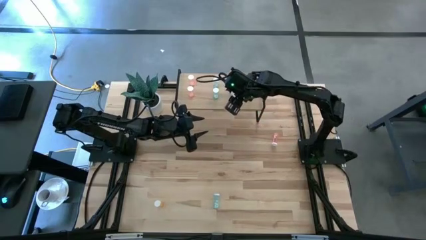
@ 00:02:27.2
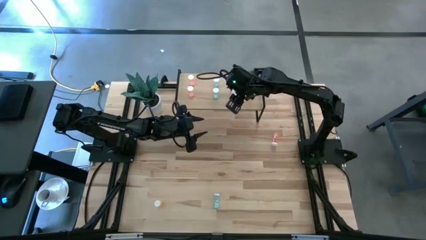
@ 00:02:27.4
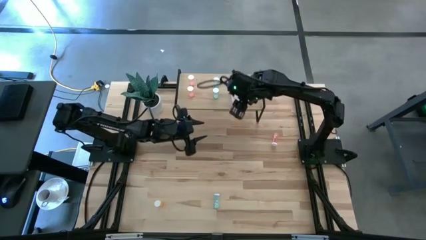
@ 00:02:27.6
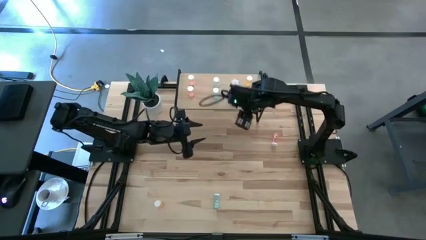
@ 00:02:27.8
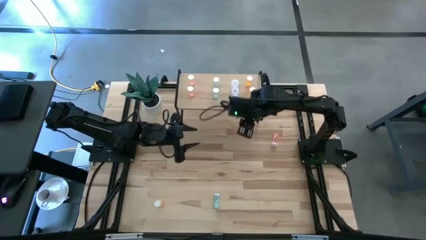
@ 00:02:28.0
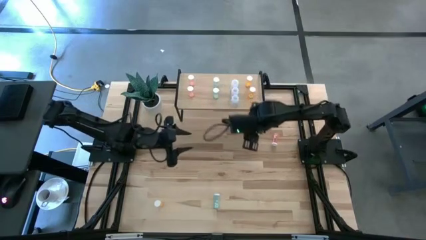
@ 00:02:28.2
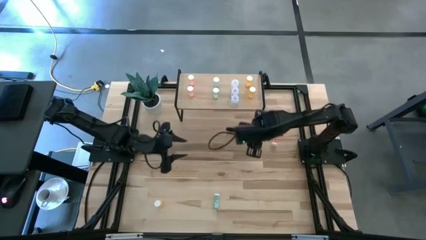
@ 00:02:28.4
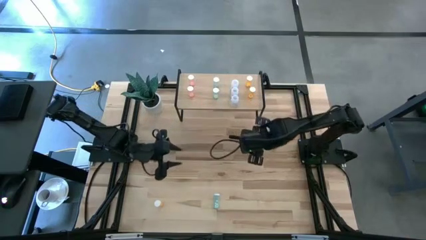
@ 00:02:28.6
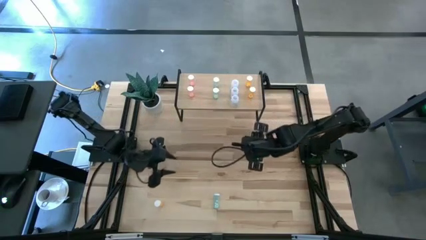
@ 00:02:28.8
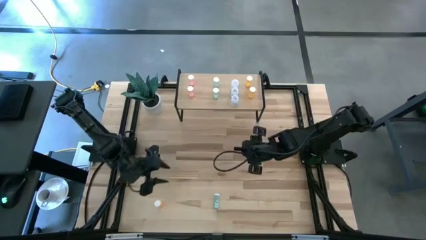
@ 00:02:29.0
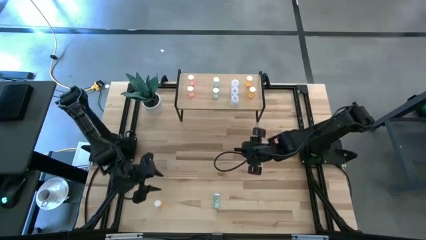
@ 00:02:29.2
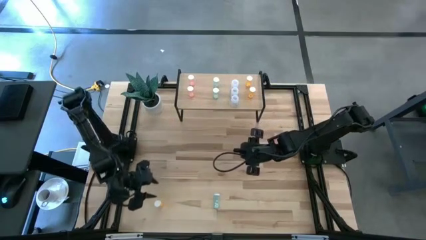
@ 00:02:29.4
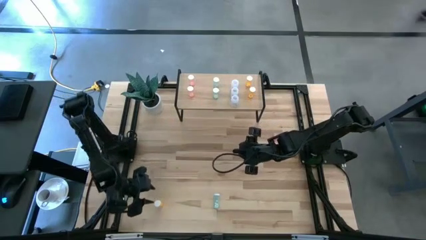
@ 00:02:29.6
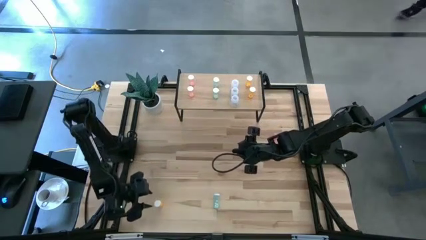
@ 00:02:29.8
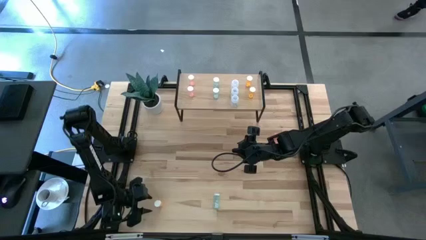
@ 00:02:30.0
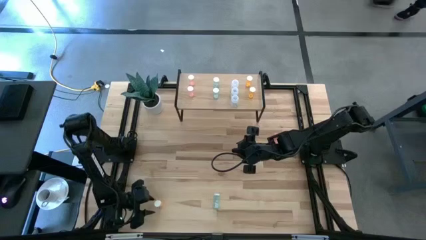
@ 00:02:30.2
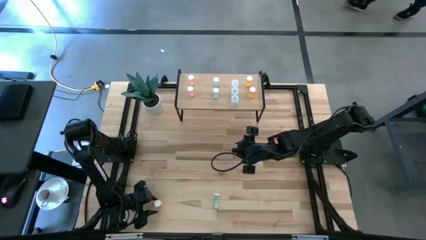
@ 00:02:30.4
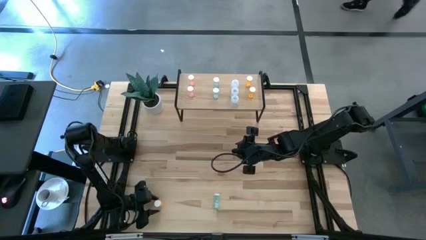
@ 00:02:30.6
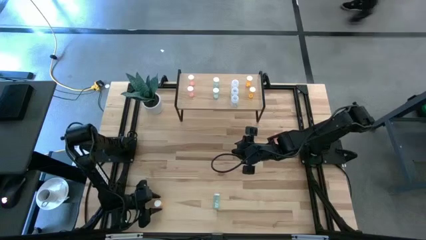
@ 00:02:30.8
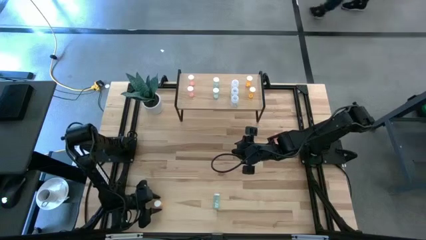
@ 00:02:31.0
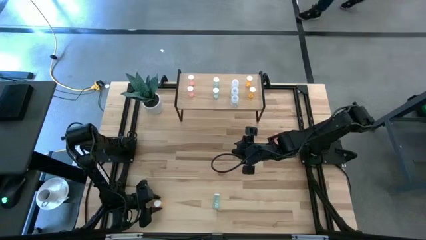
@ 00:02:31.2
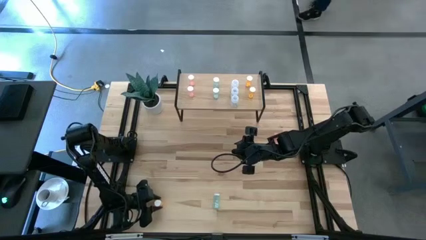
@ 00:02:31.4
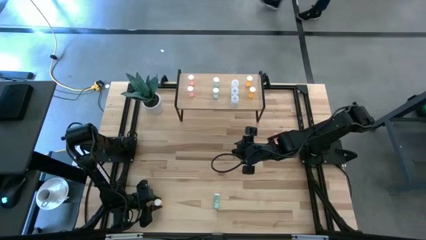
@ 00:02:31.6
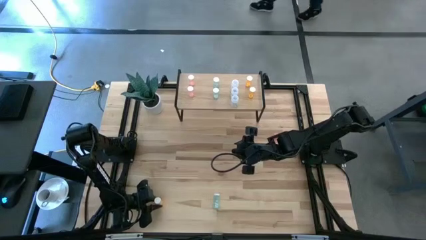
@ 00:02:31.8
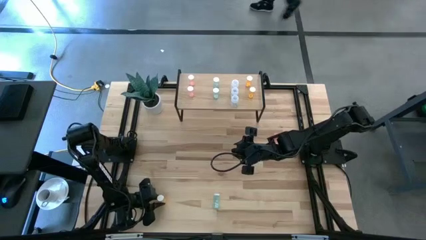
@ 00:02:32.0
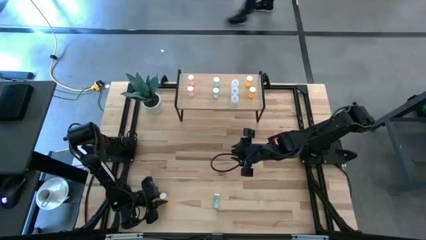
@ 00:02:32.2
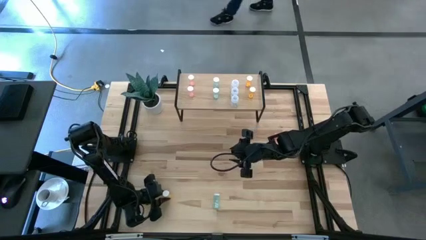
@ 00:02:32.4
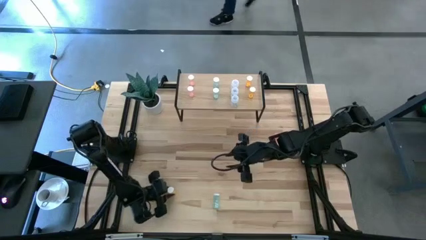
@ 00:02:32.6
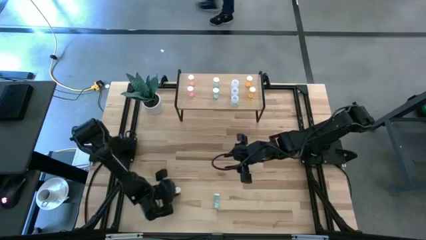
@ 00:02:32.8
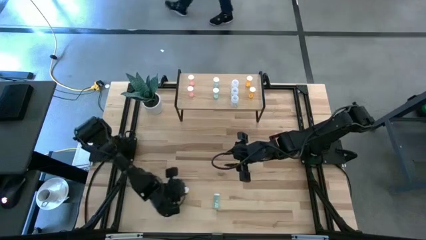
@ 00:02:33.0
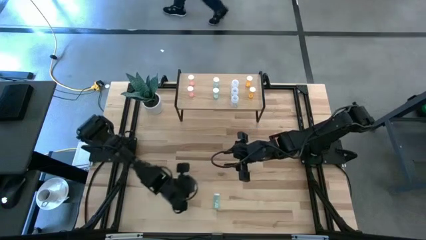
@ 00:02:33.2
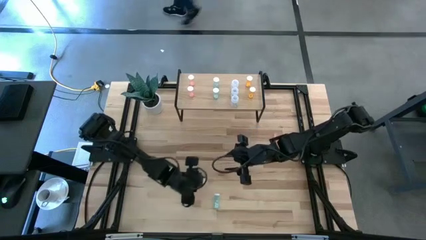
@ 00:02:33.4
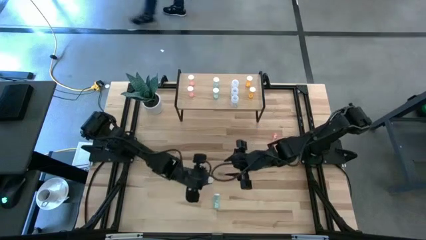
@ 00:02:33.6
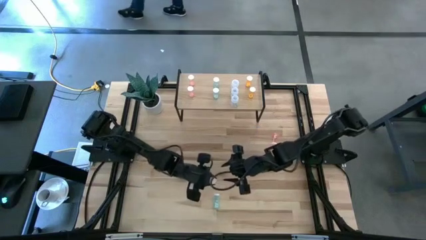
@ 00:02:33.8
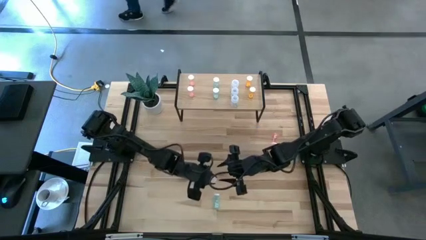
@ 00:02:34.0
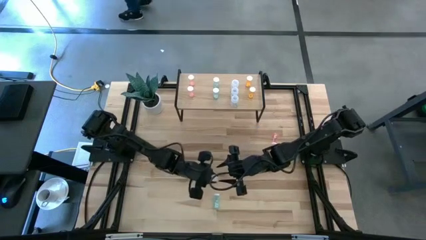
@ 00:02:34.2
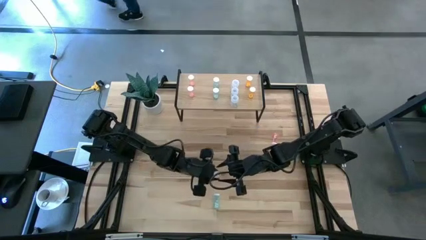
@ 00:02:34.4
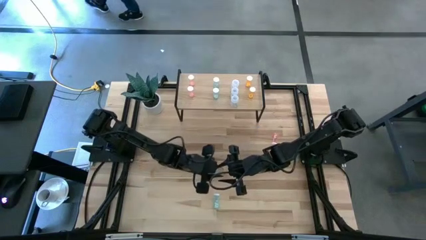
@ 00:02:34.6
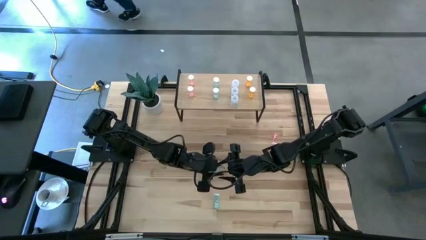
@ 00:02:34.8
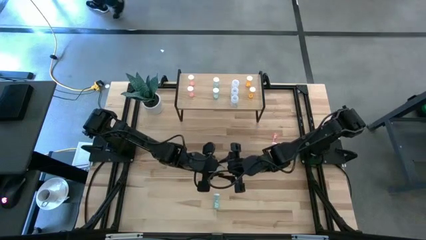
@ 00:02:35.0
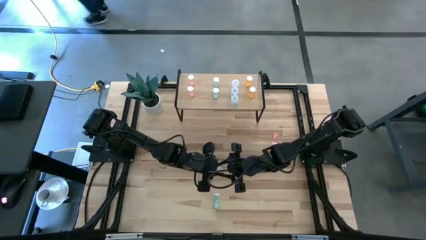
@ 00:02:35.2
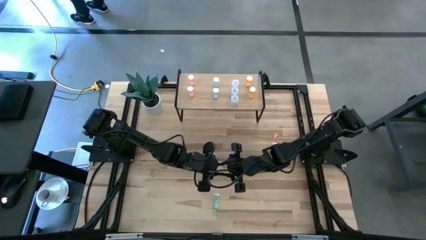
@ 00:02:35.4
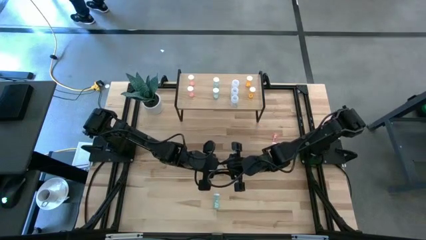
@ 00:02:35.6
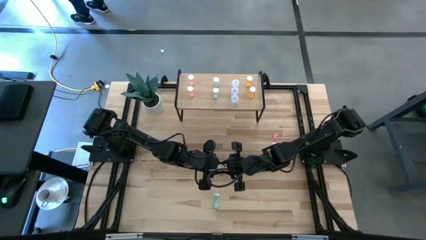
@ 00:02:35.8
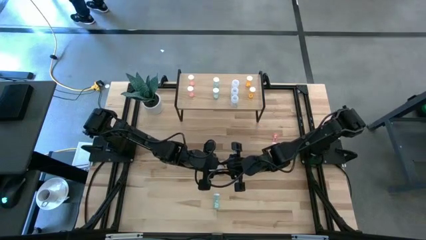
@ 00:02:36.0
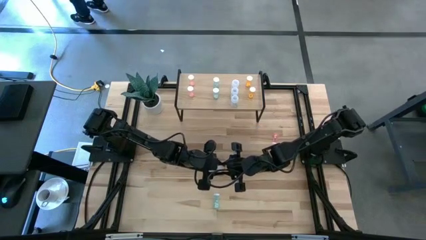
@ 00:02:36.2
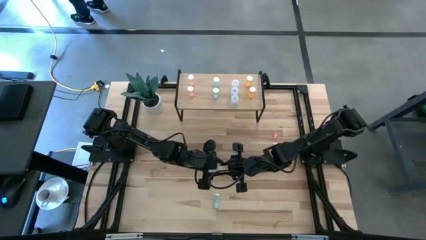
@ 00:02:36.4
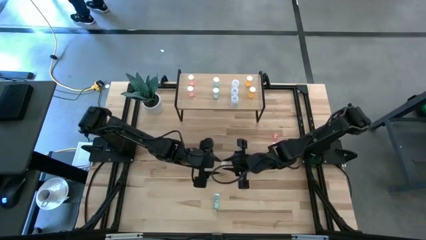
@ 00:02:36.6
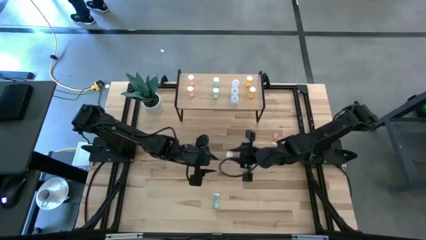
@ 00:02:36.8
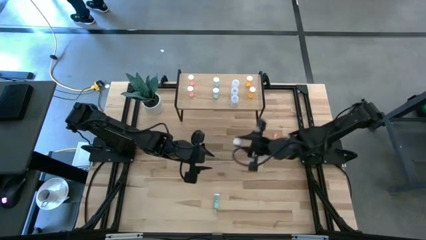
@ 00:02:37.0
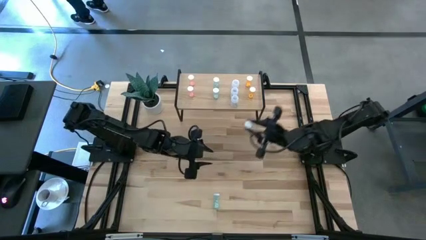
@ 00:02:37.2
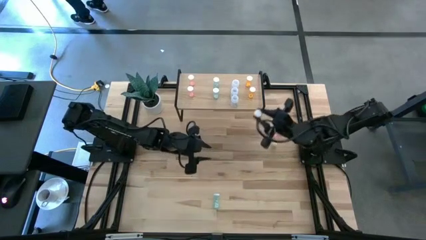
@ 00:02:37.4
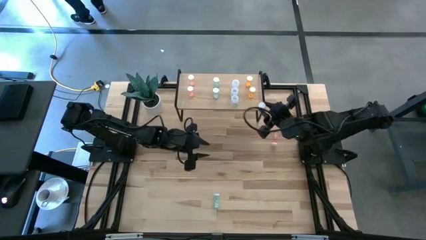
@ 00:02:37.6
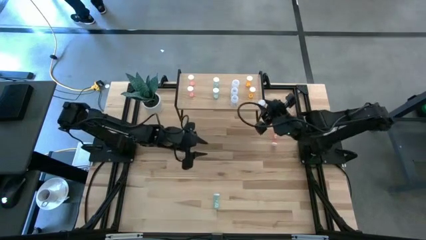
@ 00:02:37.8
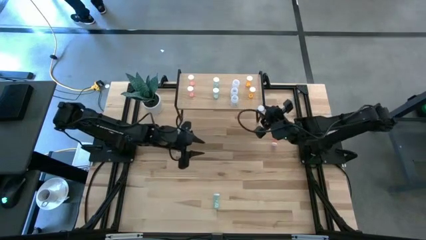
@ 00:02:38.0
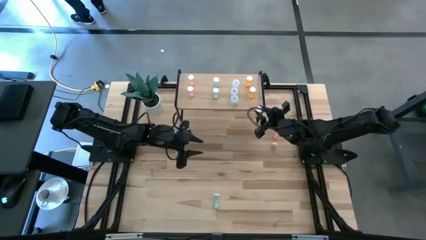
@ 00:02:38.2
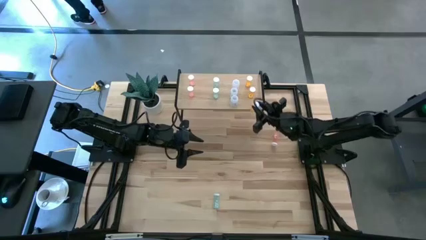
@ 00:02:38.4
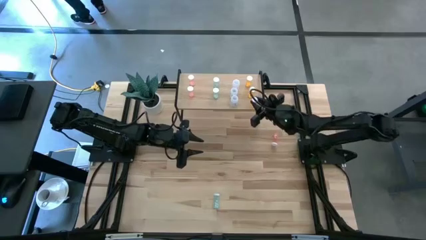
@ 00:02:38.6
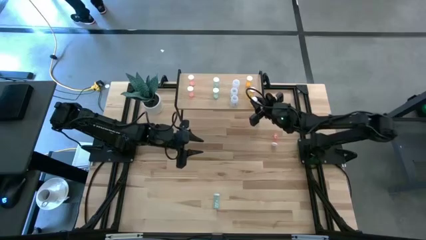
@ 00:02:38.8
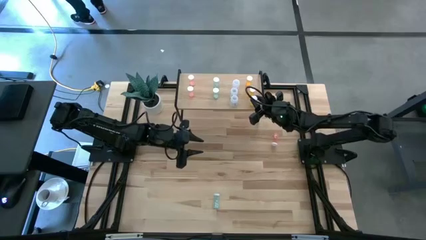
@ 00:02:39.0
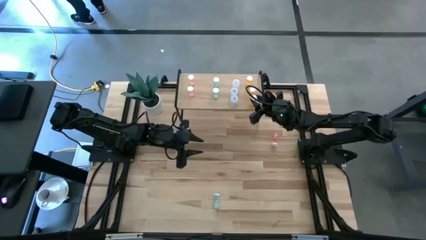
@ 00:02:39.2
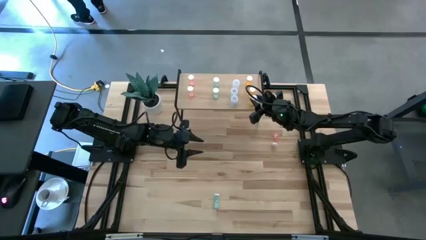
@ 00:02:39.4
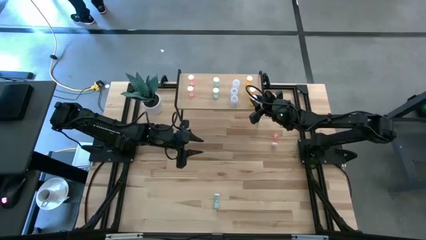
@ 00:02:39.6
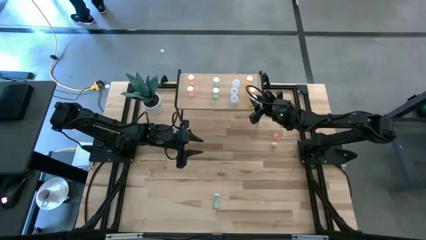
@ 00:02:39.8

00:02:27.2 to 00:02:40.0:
Task: Pick and place medicine bottles onto shelf by color
Put the orange pill bottle aligned with the other orange pill bottles on the shelf
